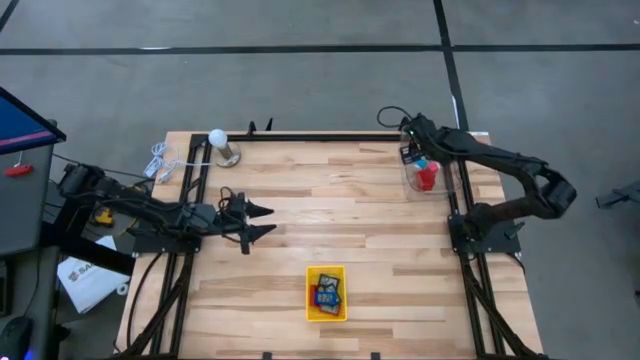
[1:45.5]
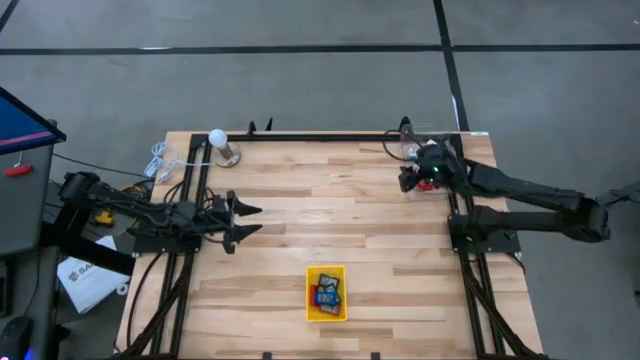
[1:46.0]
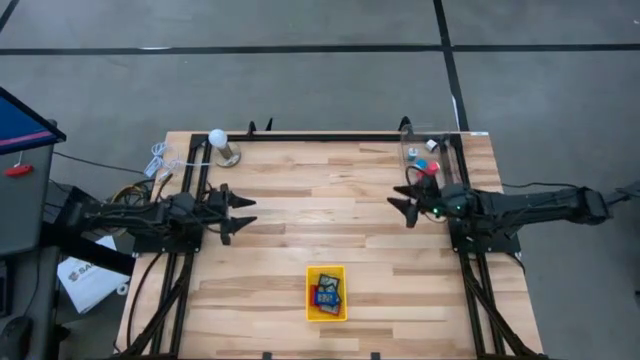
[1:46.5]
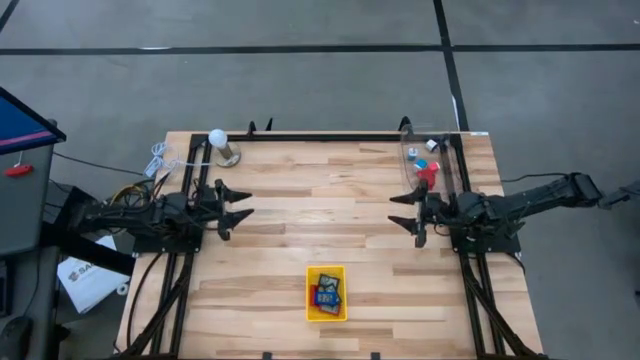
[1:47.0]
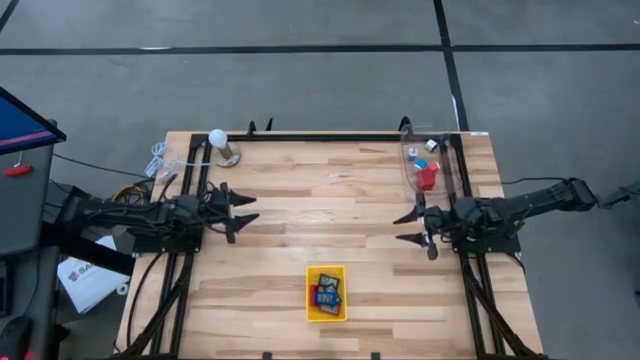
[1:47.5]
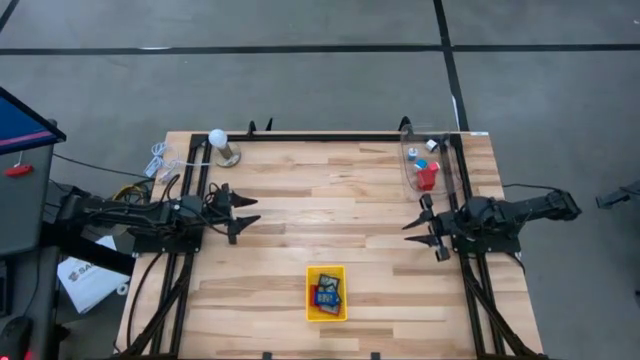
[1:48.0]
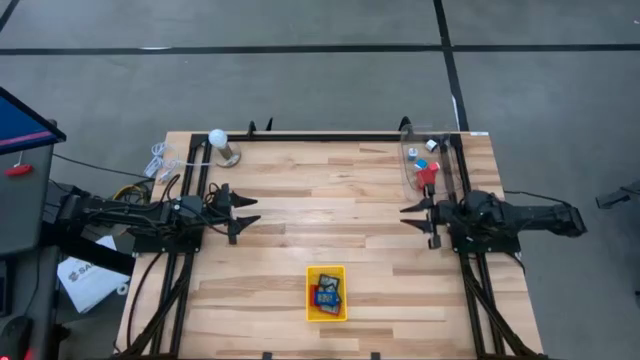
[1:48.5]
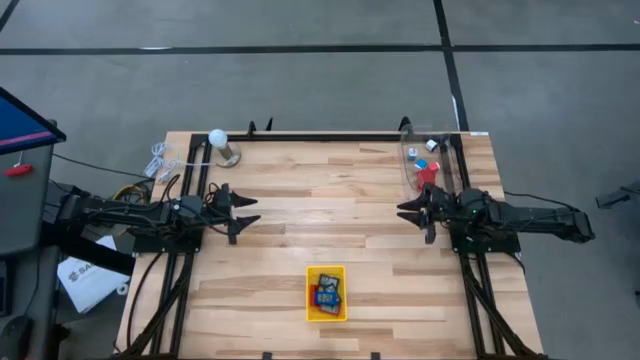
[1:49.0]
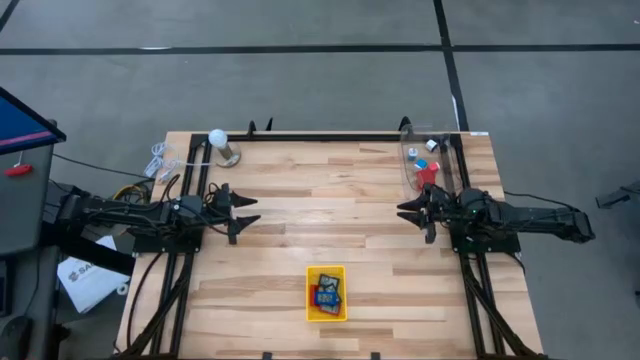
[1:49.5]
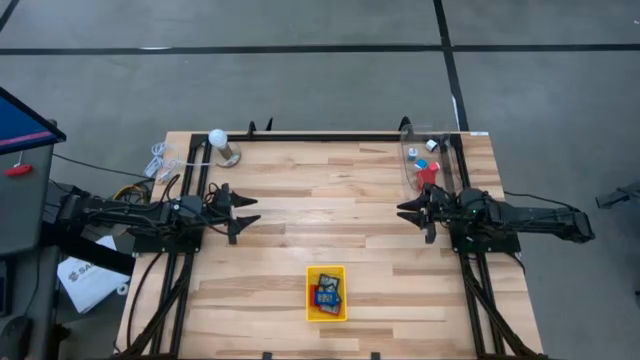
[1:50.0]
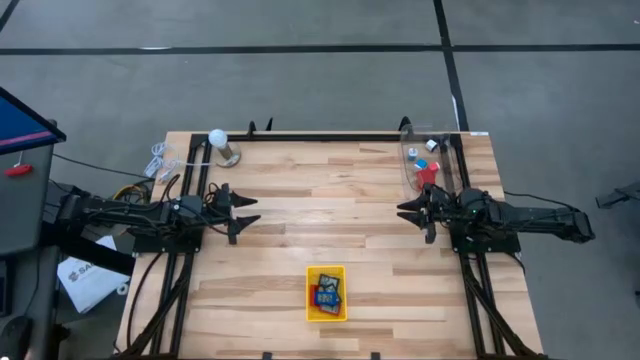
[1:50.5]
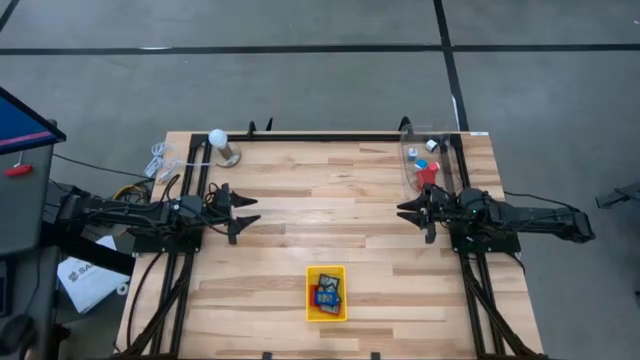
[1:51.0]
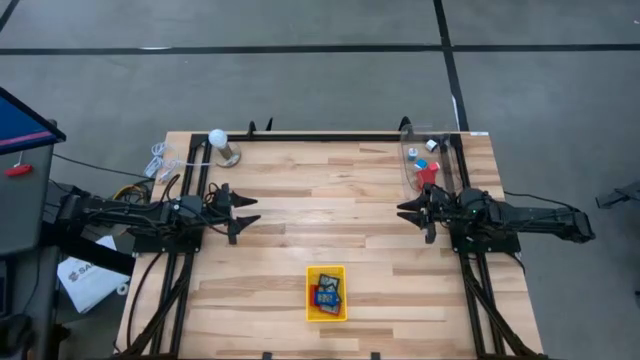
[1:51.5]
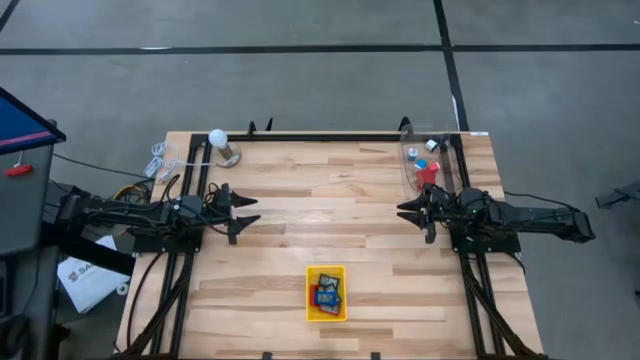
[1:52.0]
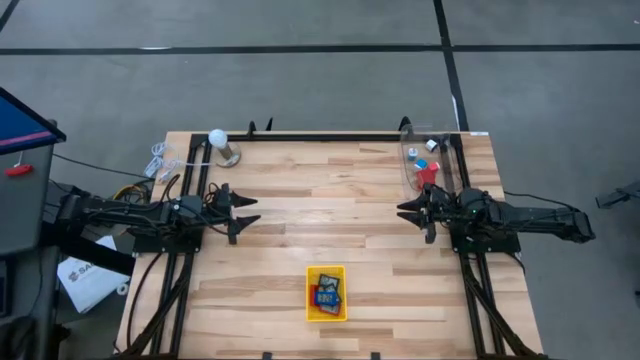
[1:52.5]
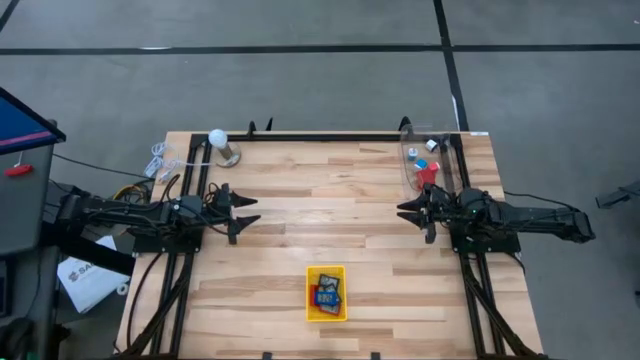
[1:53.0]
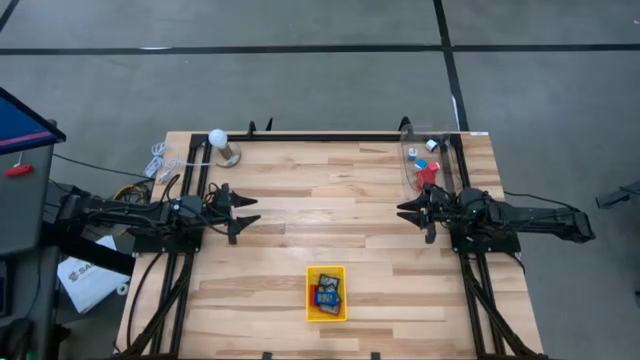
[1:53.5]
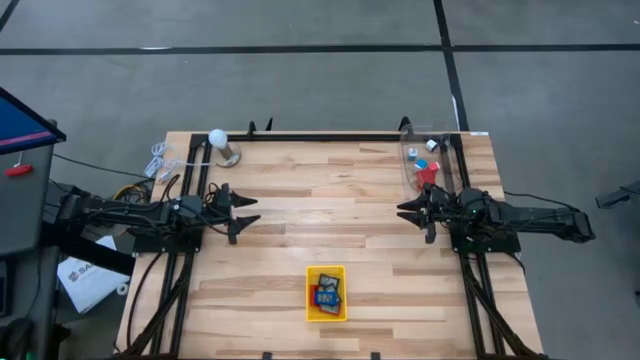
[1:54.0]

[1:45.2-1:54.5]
Task: Pick & Place Office items
Return to Home Position

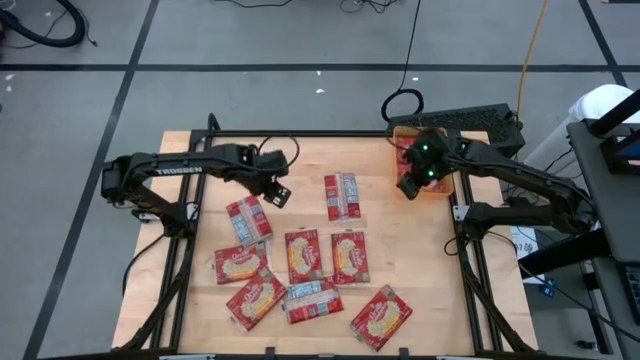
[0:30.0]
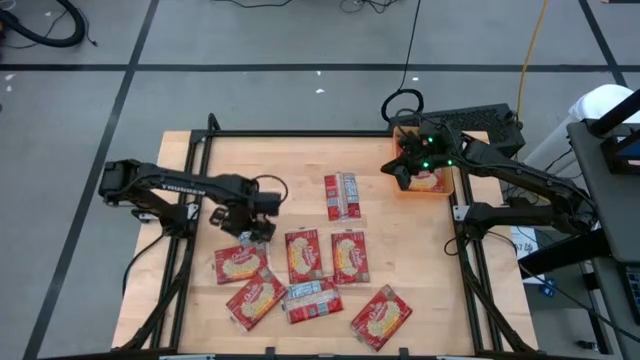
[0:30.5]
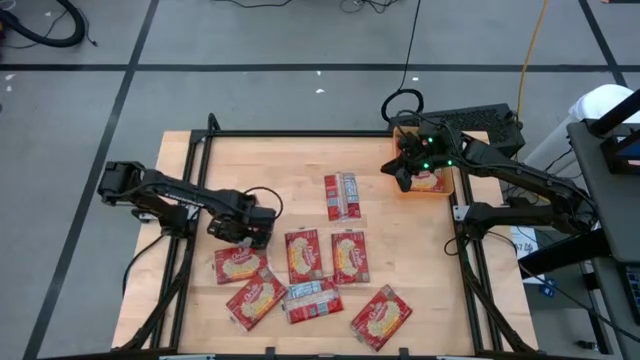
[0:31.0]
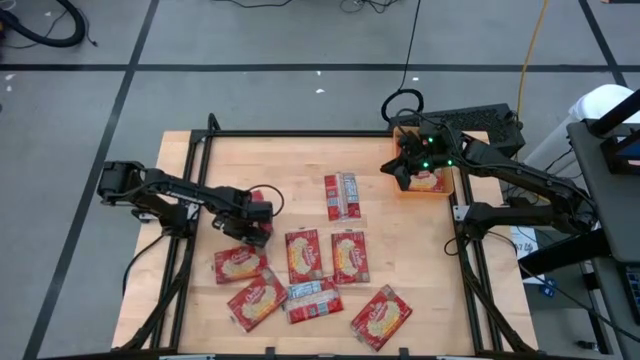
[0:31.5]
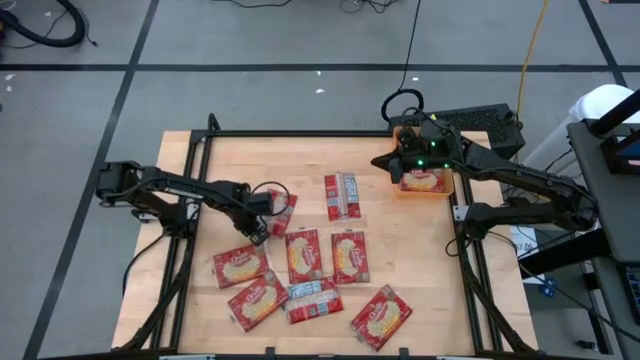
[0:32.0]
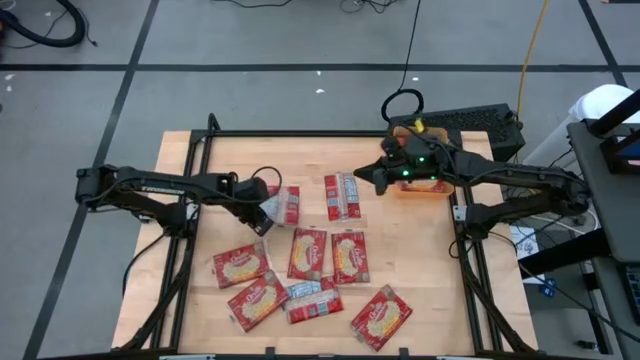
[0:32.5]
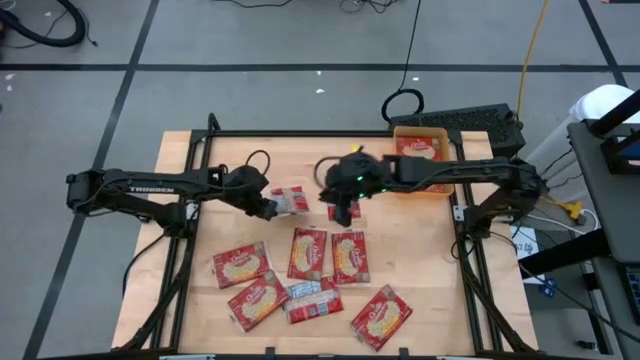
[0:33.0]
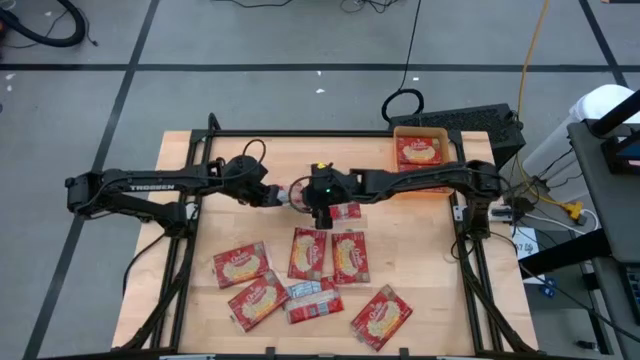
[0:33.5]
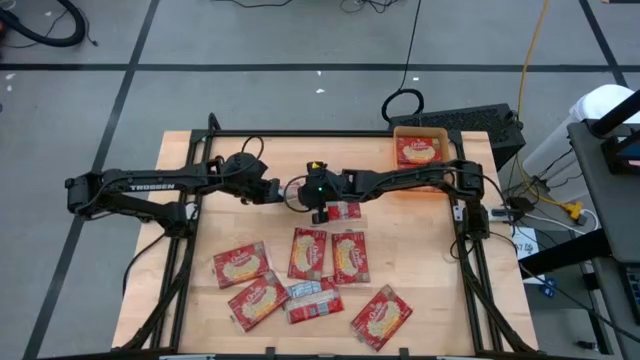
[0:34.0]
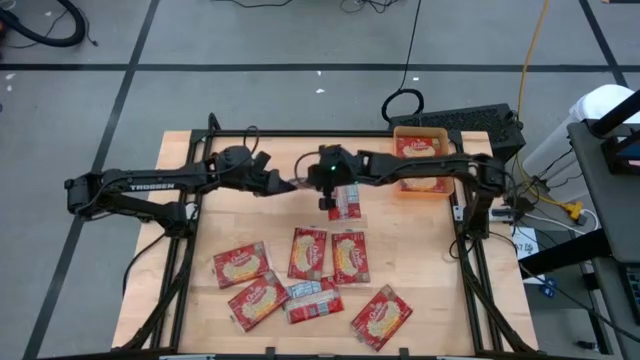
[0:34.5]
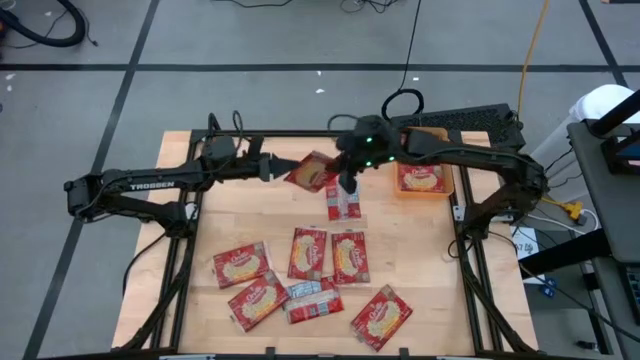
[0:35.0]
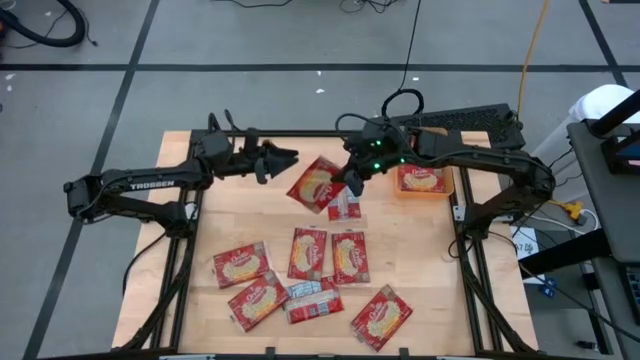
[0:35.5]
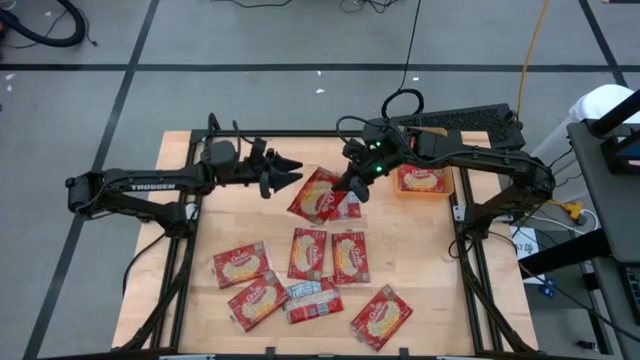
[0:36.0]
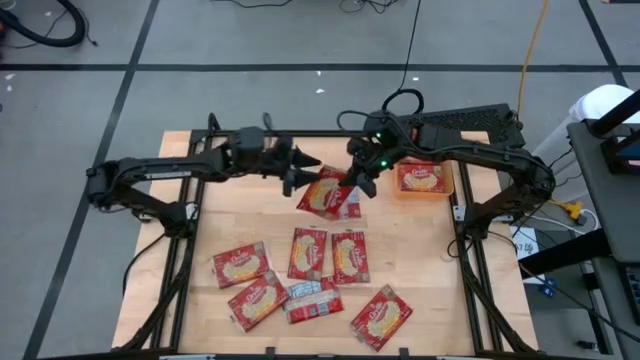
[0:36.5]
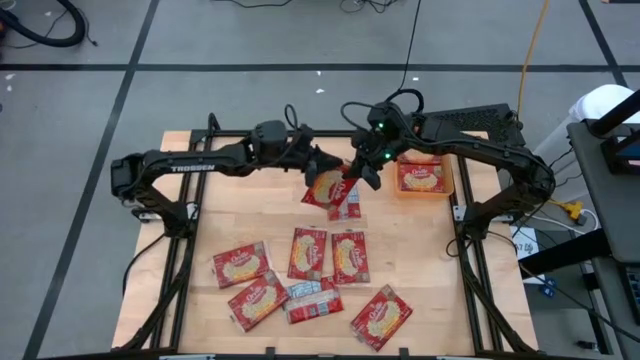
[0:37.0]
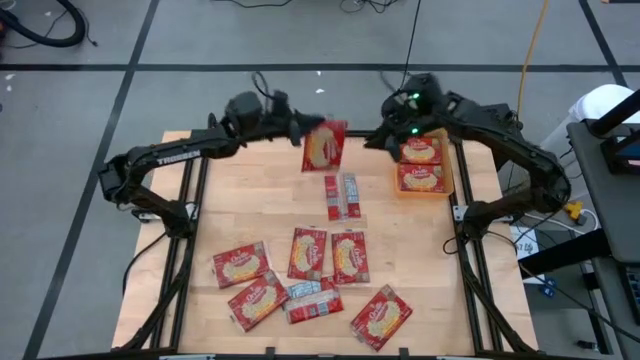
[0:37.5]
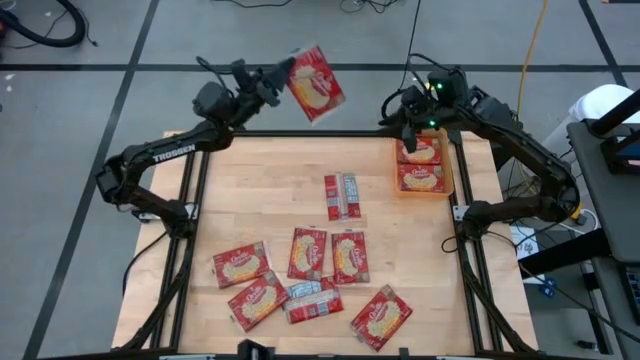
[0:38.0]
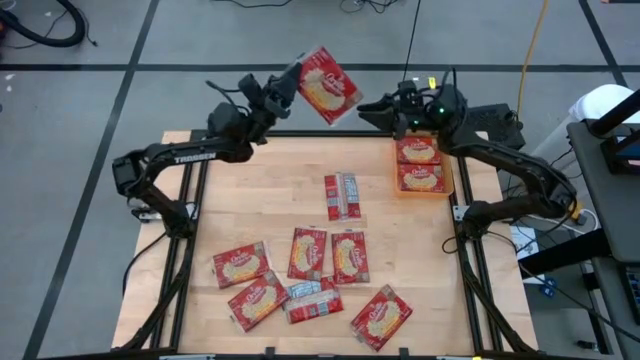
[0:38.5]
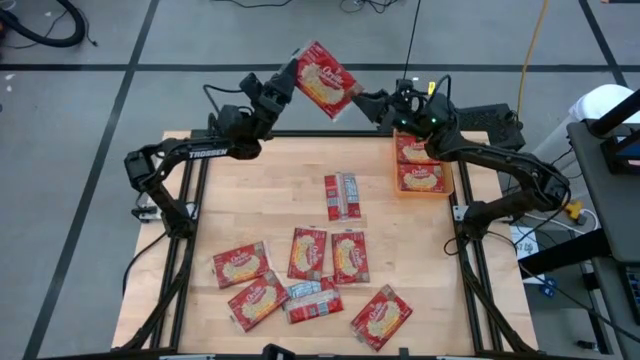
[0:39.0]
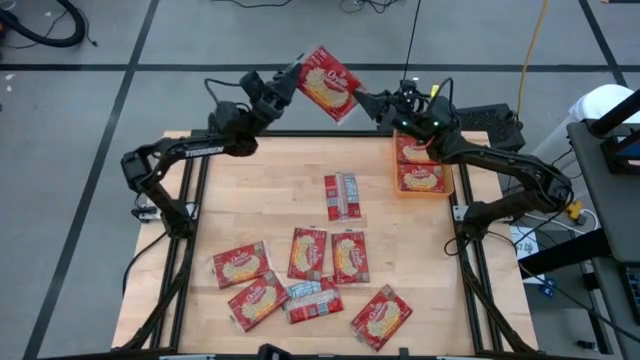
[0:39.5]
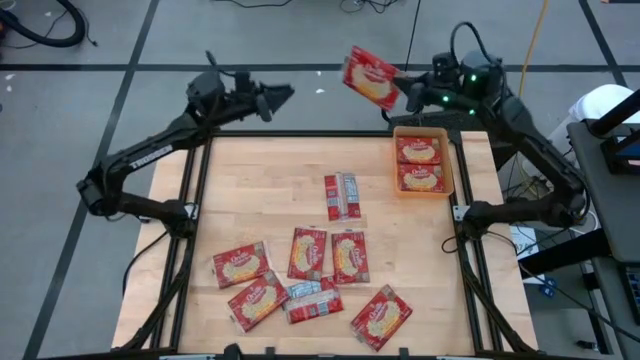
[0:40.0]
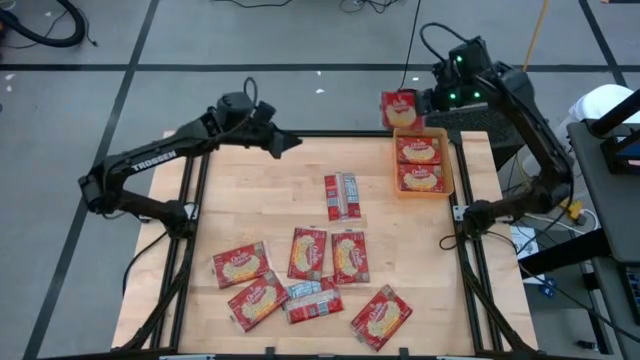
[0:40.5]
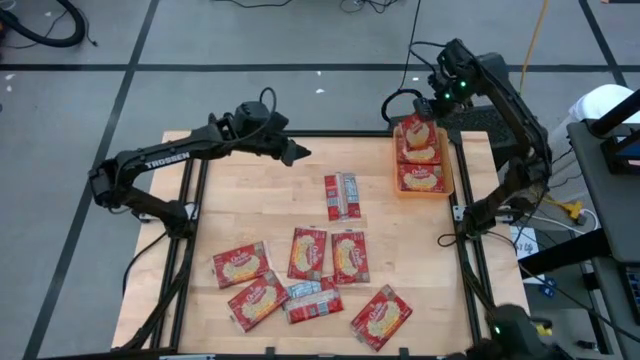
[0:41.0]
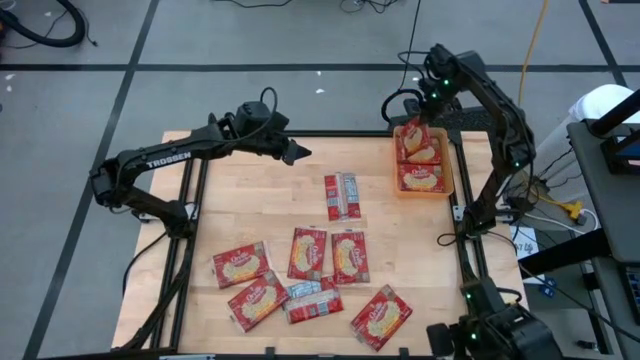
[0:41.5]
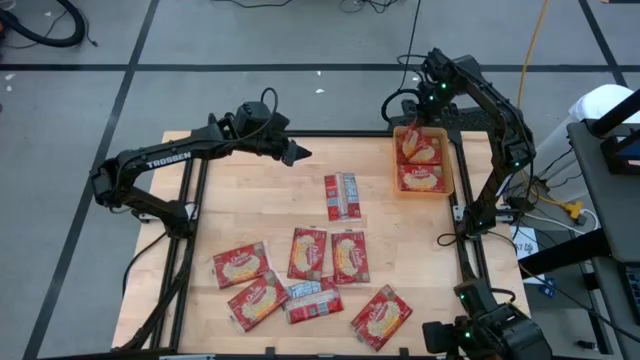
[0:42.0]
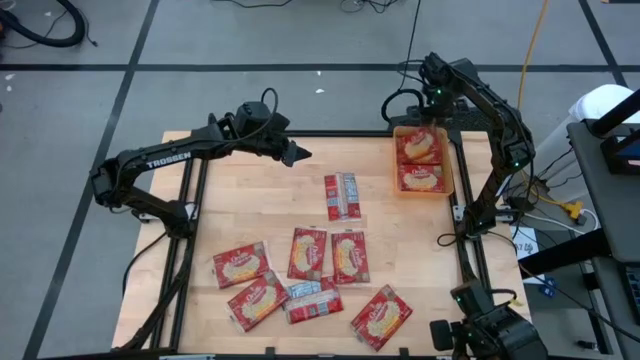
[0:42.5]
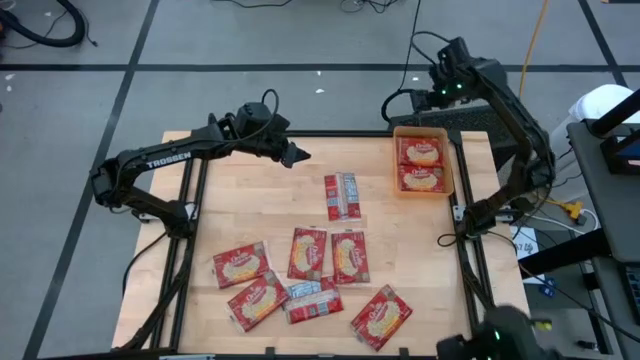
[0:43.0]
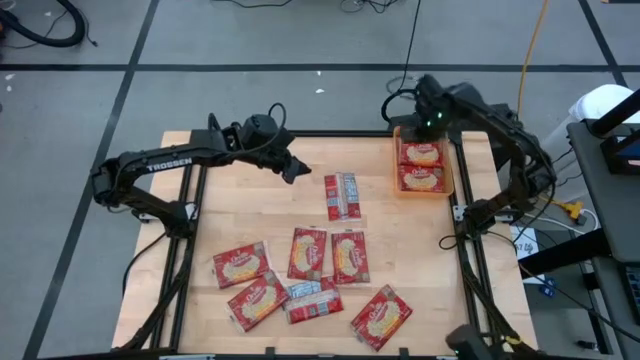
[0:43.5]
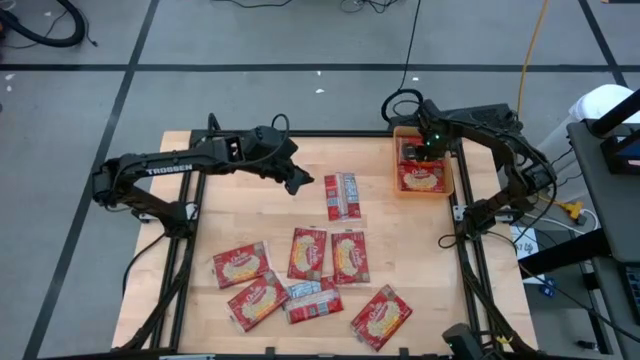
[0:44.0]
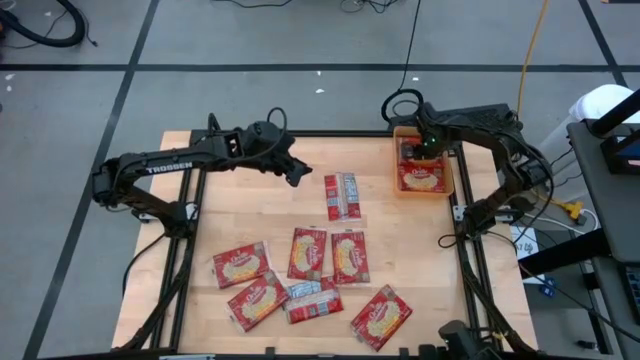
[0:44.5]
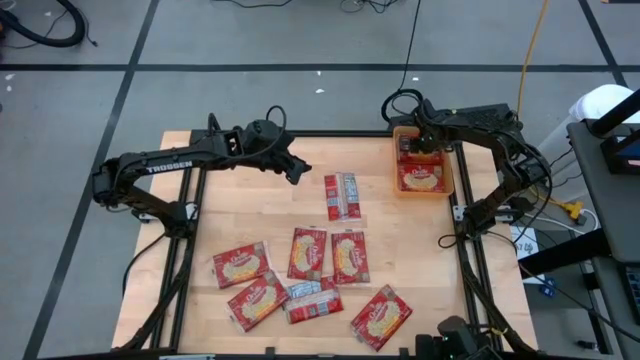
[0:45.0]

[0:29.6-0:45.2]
Task: Sort popcorn bags into baskets
Put the red popcorn bag into the orange bin
